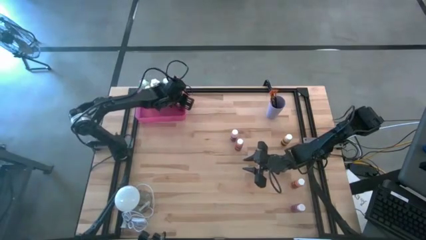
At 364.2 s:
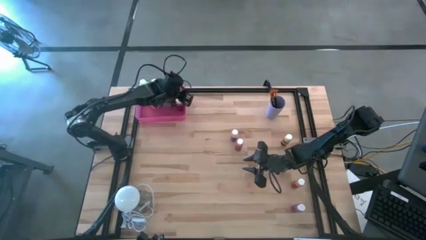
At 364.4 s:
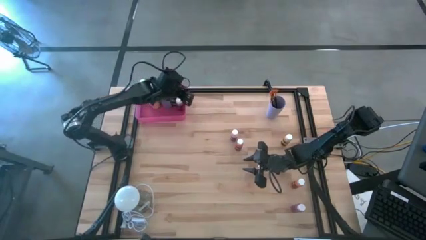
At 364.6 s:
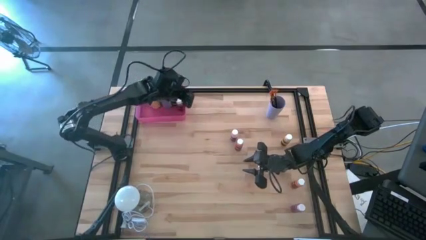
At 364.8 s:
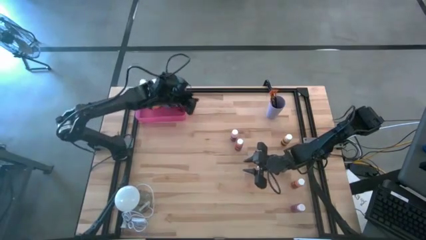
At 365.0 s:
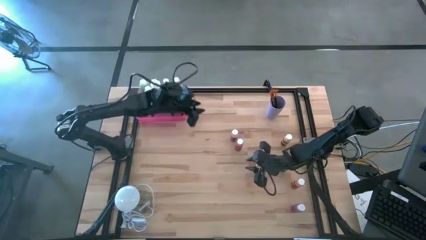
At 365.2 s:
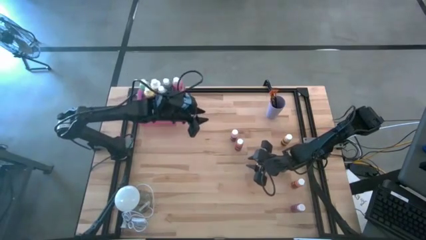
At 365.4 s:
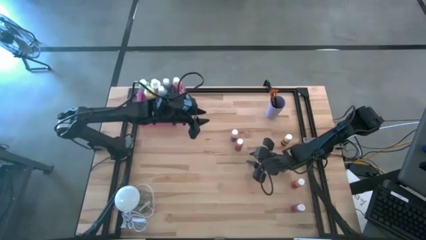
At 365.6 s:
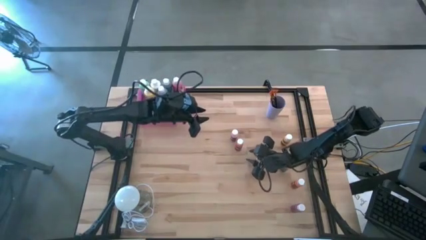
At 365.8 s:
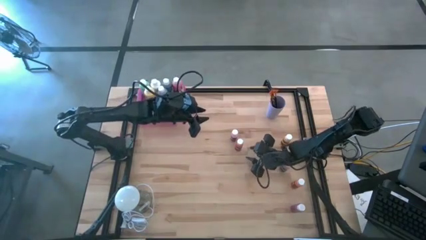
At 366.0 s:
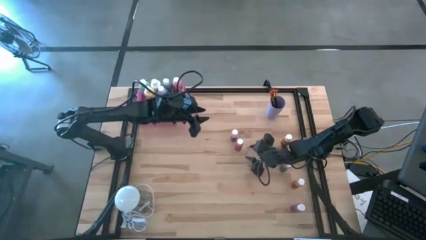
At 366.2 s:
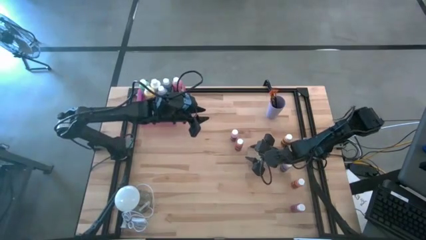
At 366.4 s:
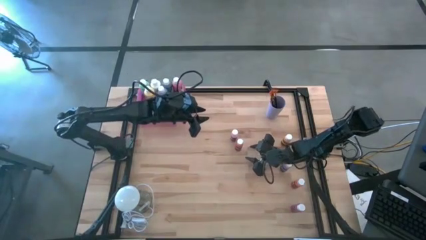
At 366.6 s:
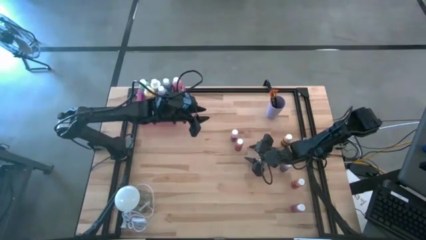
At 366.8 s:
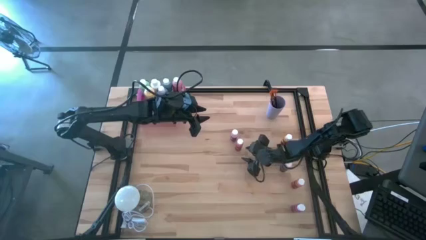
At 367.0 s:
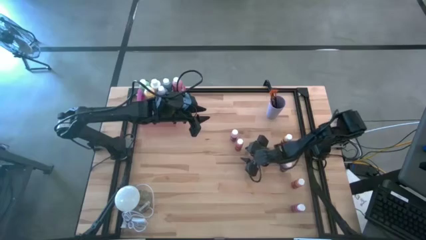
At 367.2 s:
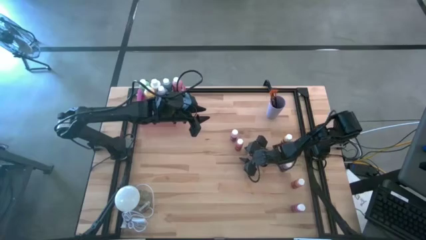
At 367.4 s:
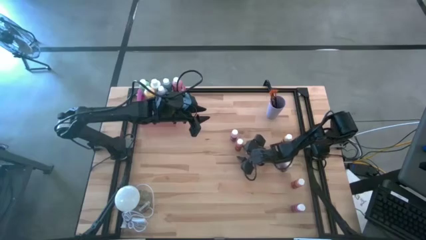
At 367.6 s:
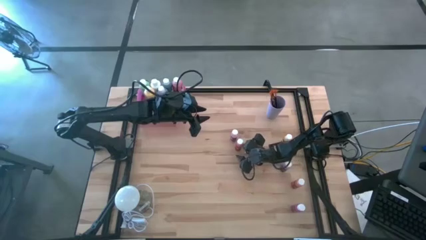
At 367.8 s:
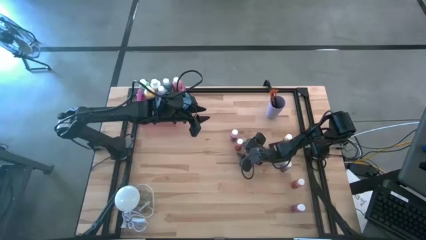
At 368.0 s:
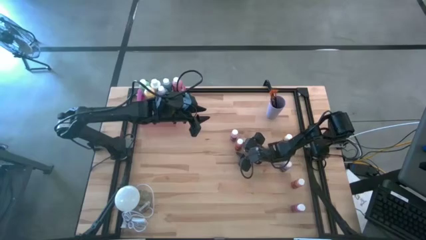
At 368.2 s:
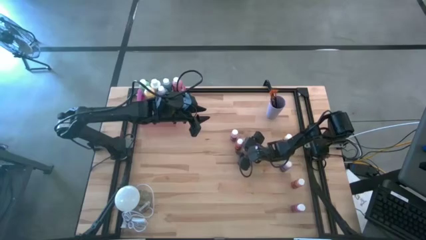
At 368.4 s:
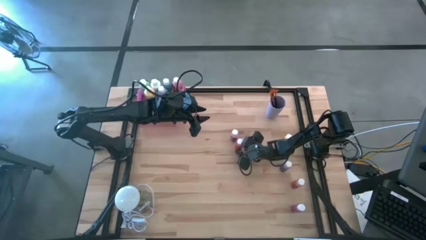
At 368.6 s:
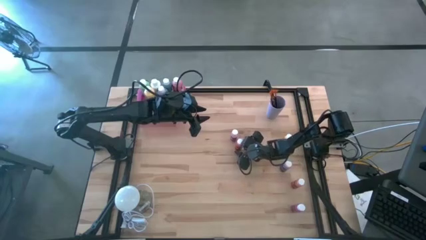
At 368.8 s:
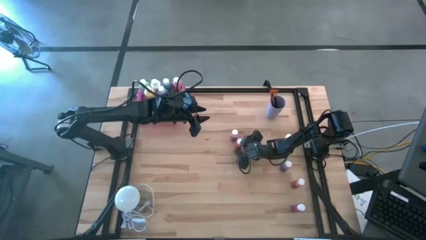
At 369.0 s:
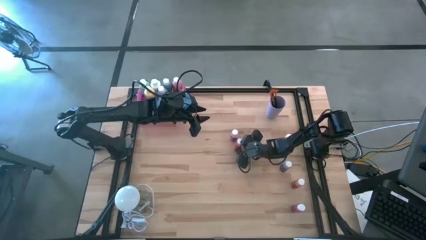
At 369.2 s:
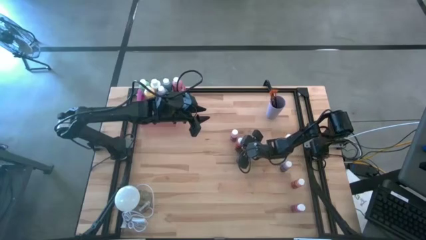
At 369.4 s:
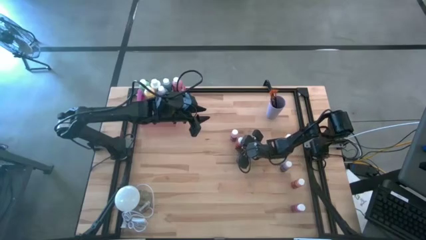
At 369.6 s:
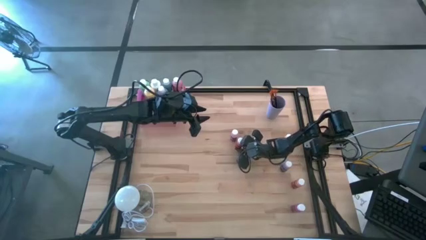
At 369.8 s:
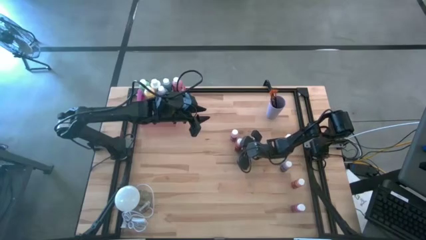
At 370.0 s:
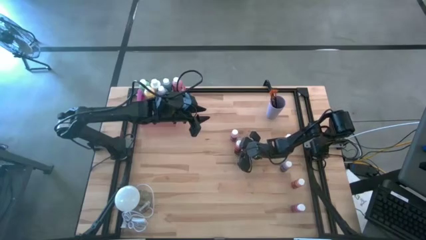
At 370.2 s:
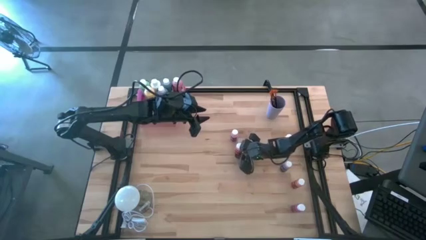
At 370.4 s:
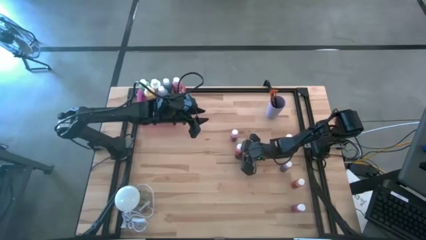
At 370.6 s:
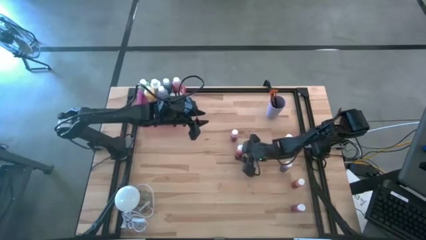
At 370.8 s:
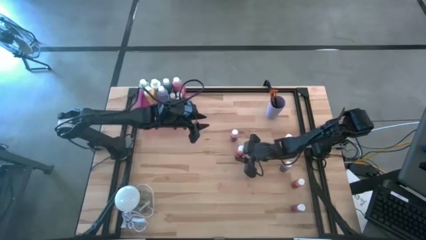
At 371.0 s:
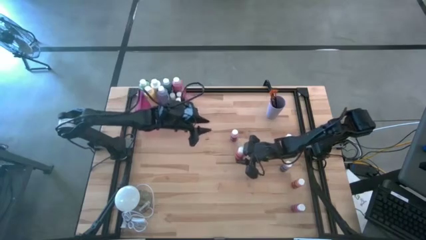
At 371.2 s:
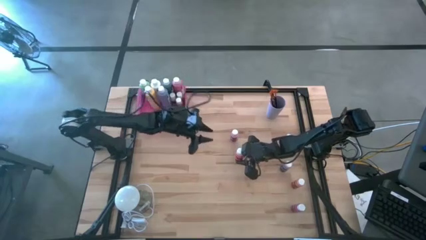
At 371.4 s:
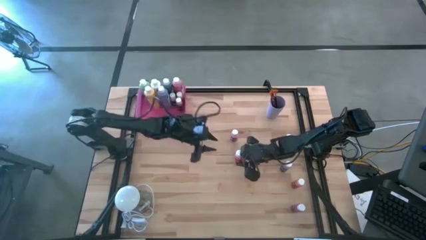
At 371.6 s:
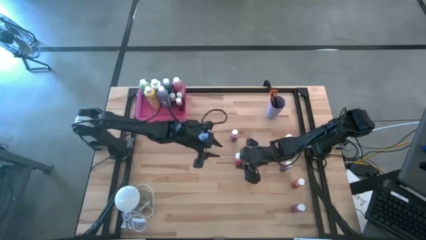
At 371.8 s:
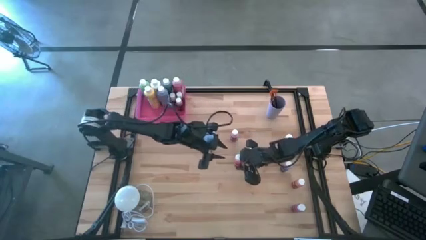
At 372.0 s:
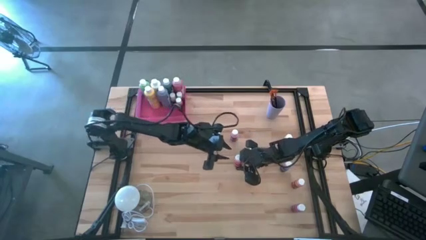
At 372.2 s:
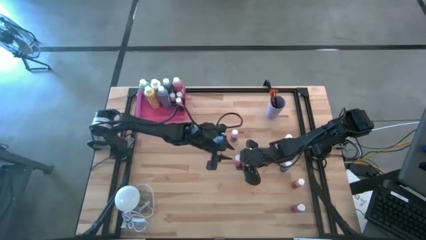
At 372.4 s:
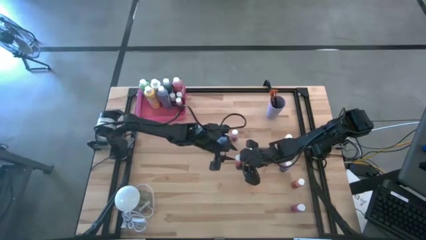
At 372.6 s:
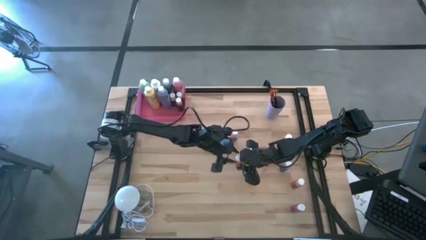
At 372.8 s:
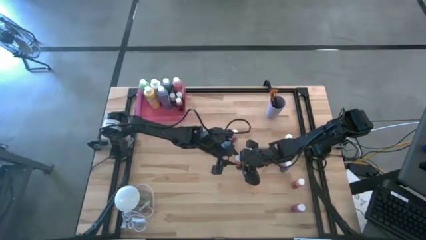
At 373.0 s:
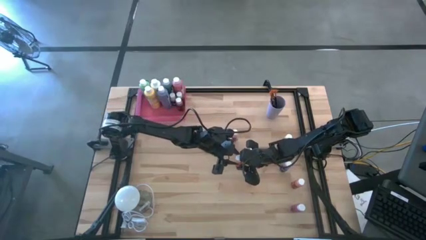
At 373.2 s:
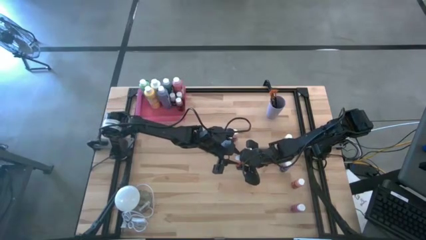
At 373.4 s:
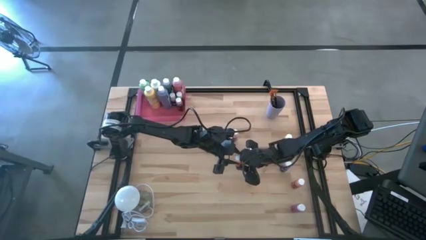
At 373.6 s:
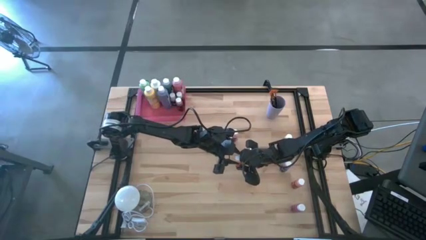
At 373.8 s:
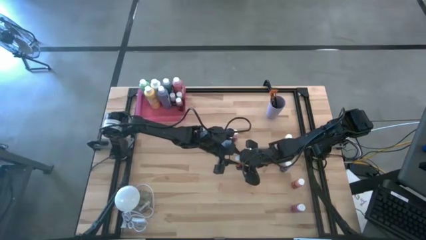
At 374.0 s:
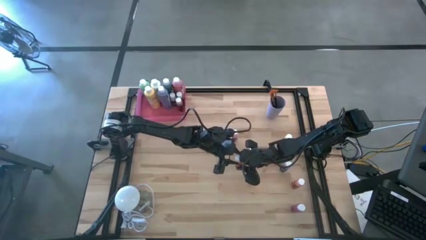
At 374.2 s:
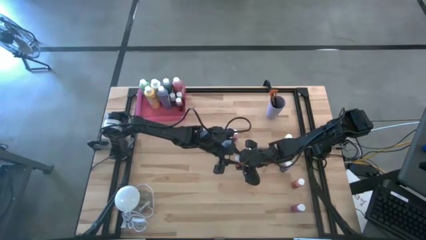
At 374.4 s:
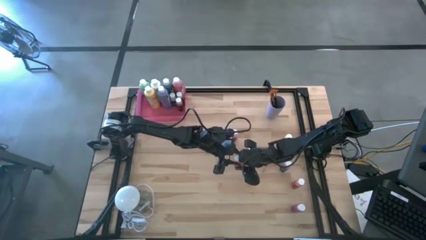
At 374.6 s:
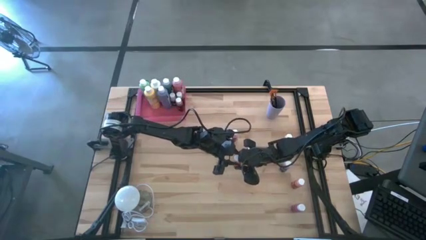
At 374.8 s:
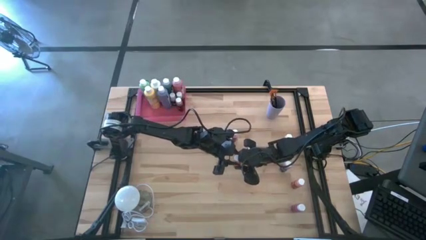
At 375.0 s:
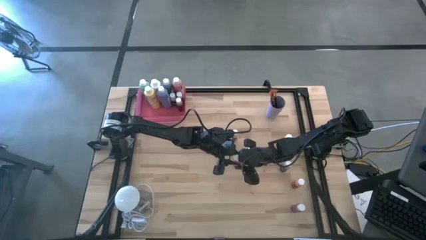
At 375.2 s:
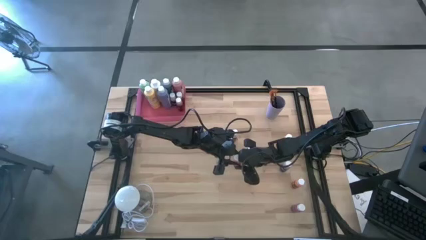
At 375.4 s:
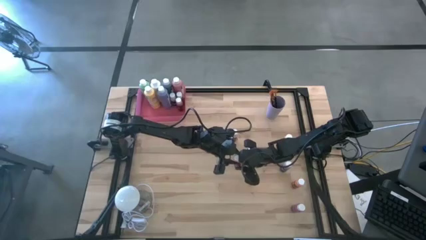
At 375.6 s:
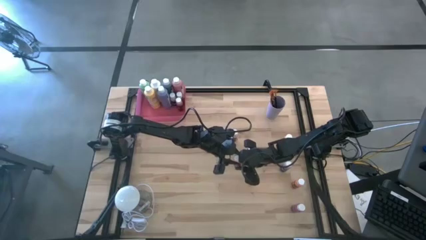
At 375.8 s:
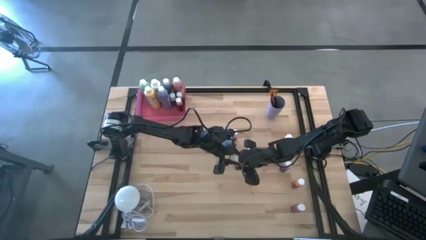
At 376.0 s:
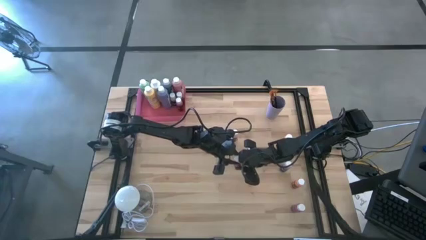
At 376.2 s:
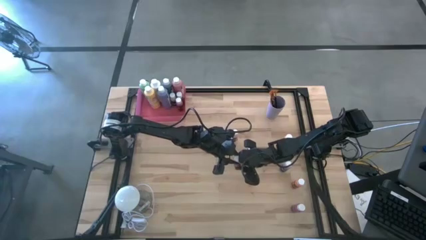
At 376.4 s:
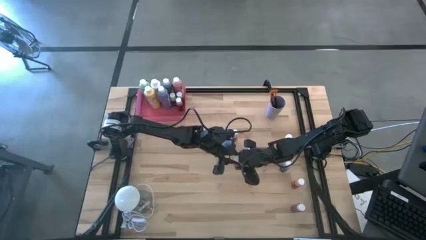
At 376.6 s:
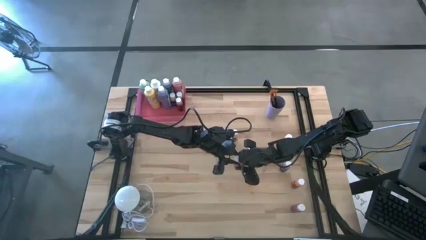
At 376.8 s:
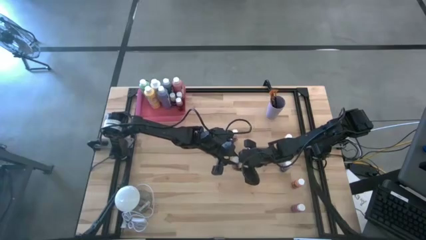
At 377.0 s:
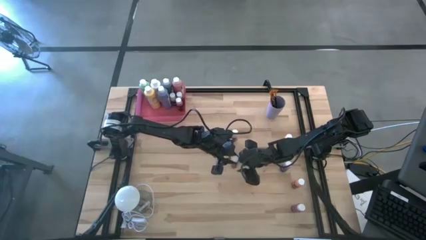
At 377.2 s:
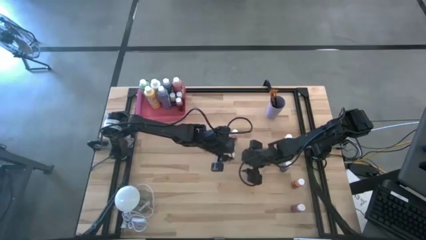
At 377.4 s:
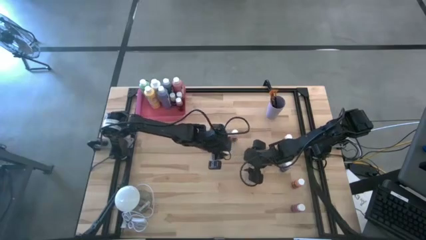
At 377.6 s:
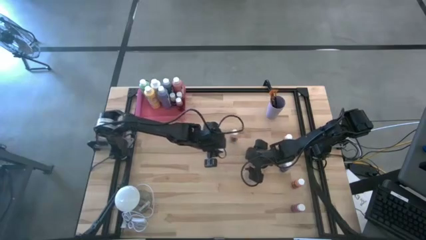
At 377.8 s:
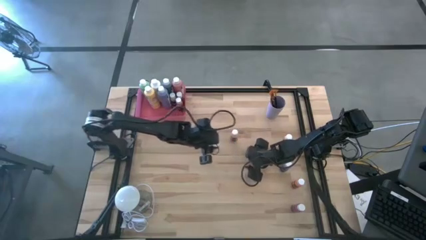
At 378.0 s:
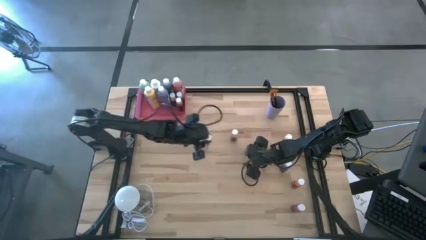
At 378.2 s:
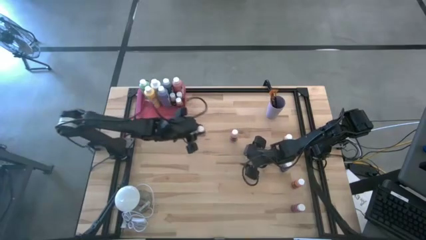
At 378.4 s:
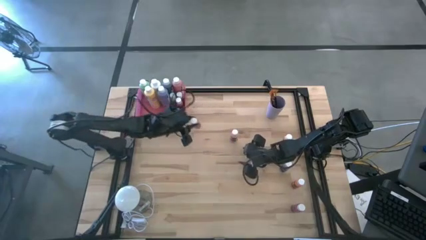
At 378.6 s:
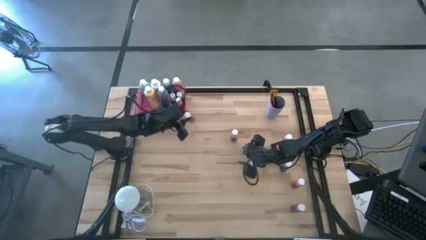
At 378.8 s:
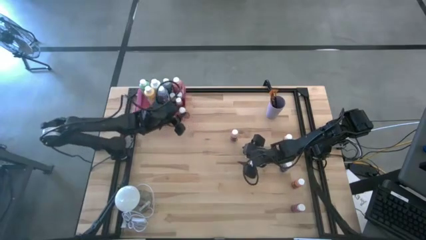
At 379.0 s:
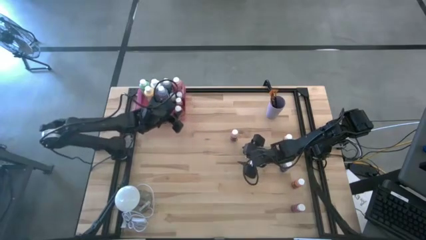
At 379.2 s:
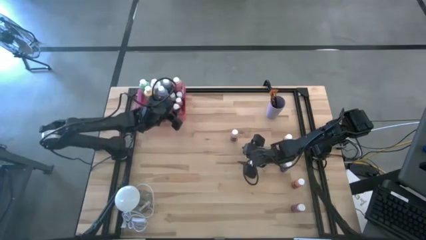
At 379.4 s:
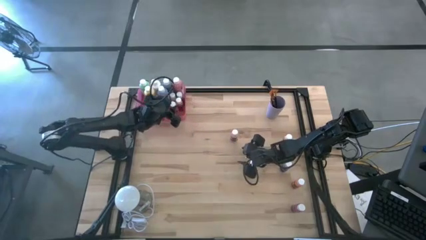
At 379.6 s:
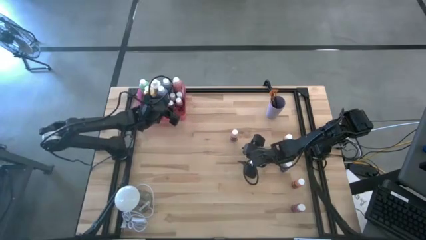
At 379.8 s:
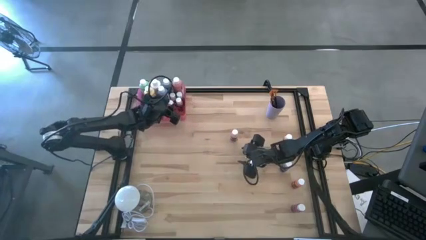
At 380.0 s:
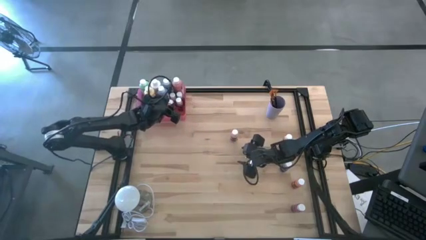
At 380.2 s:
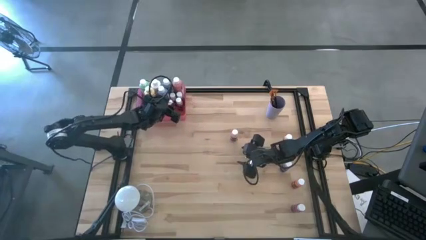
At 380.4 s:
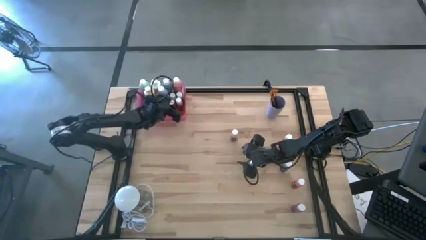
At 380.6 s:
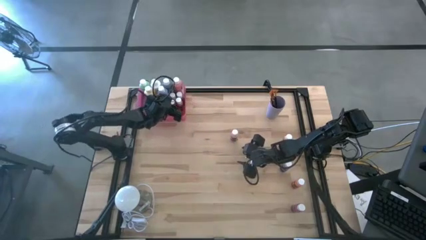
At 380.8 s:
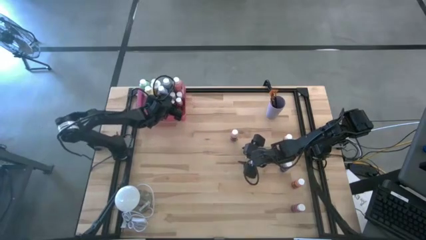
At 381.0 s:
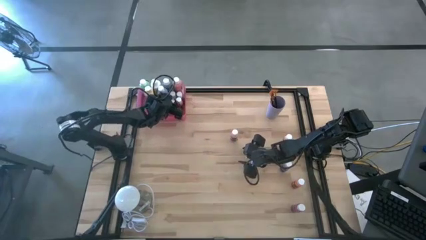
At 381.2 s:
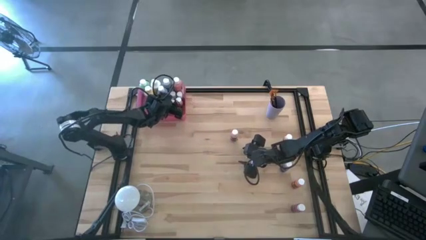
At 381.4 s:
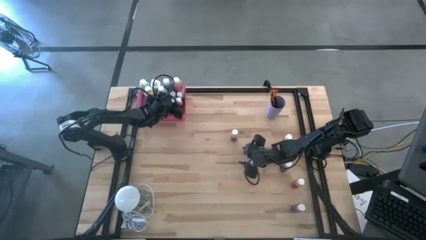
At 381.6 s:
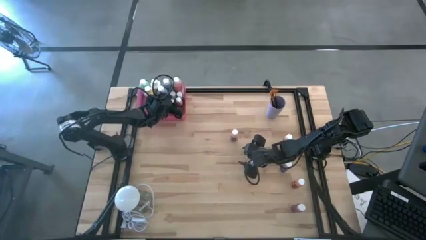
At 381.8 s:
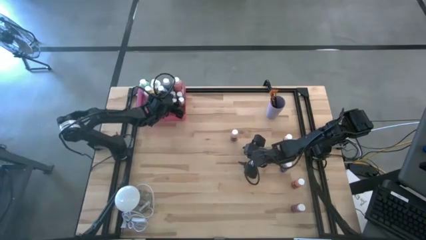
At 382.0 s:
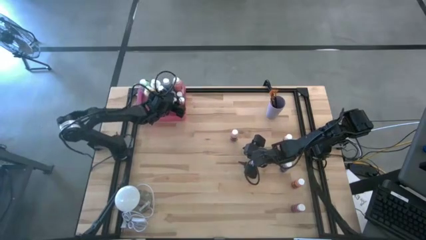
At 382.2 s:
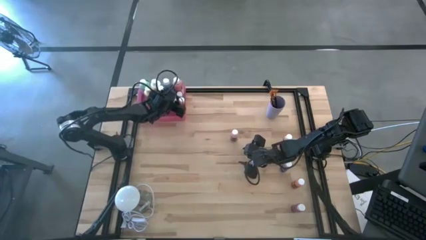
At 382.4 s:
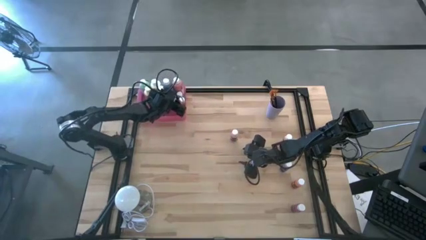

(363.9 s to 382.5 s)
Task: Pick & Place Paint Supplies
Put the small orange paint bottle into the pink bin
